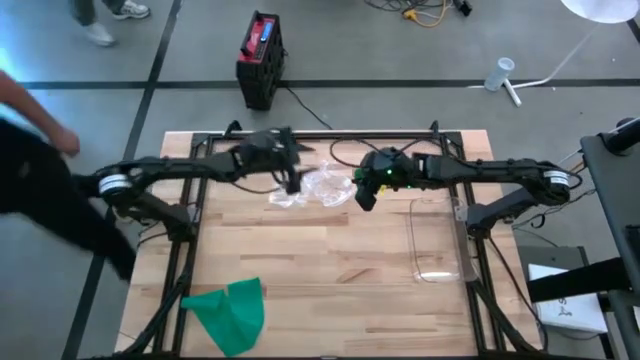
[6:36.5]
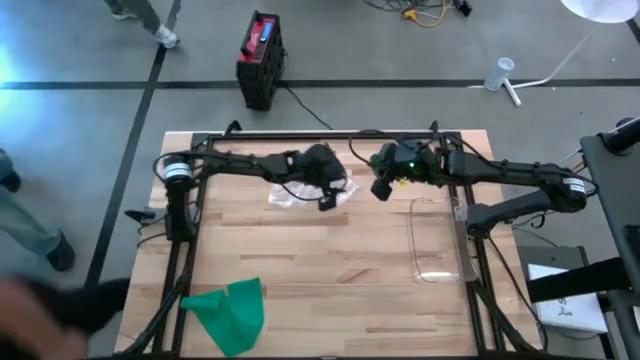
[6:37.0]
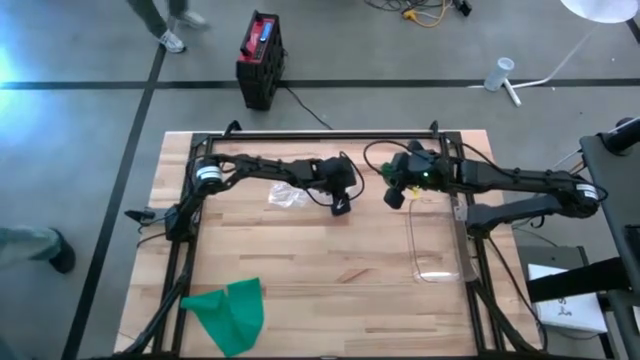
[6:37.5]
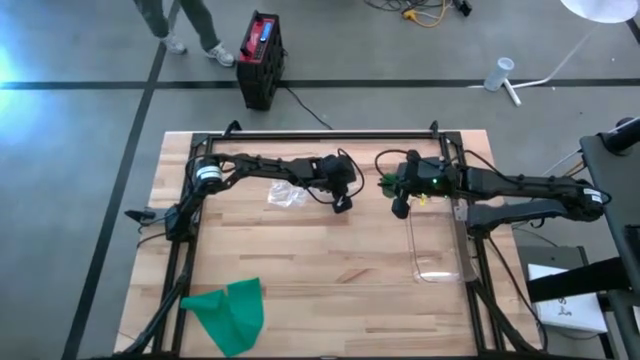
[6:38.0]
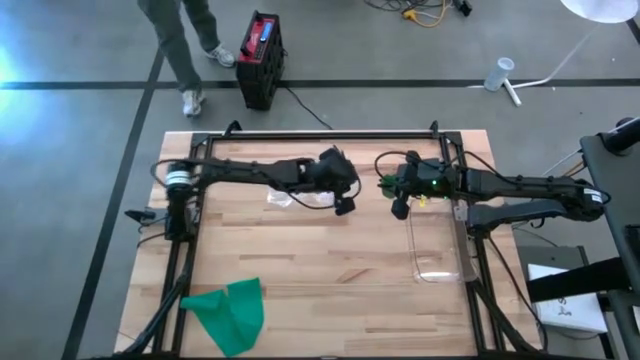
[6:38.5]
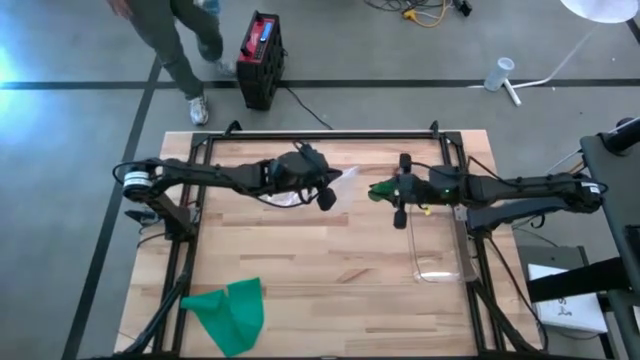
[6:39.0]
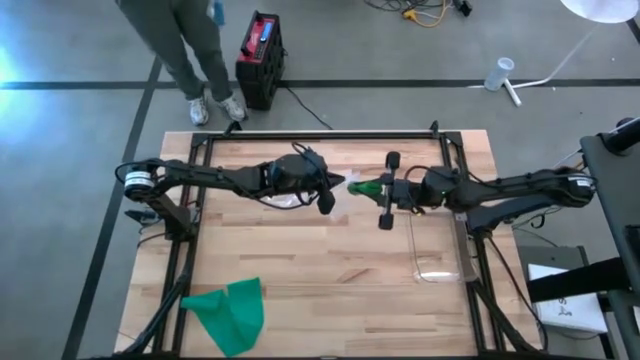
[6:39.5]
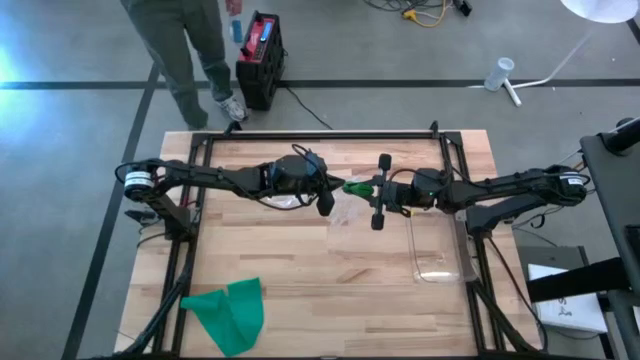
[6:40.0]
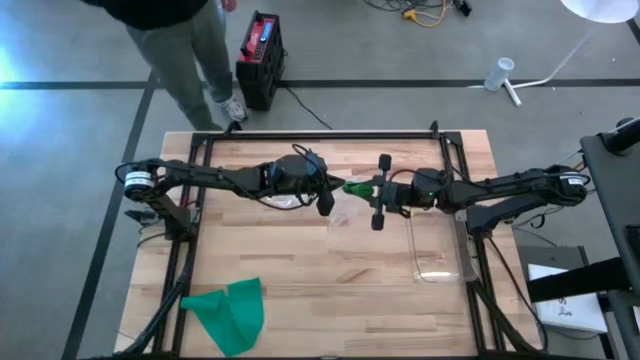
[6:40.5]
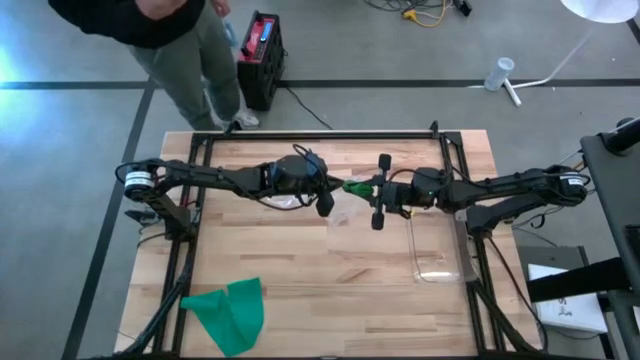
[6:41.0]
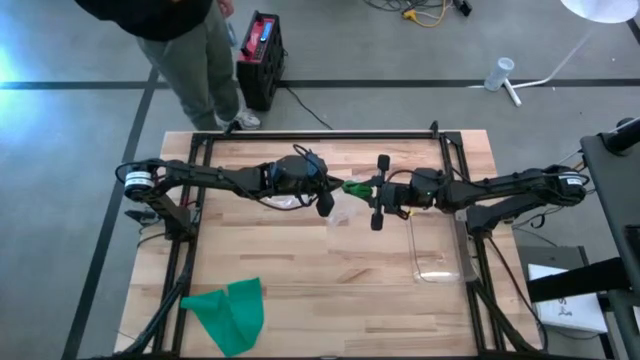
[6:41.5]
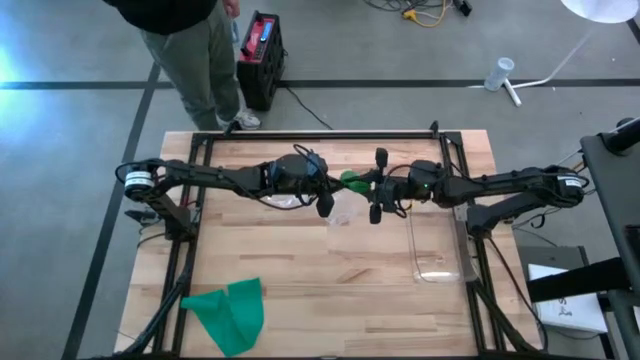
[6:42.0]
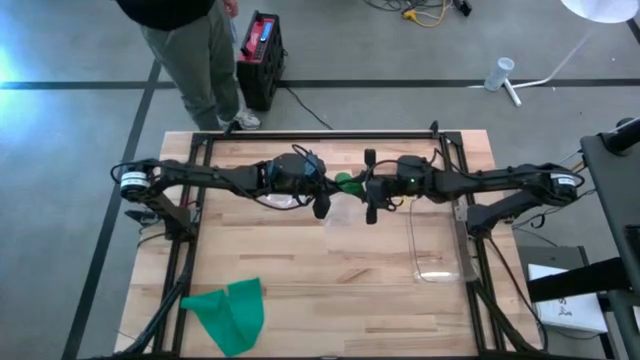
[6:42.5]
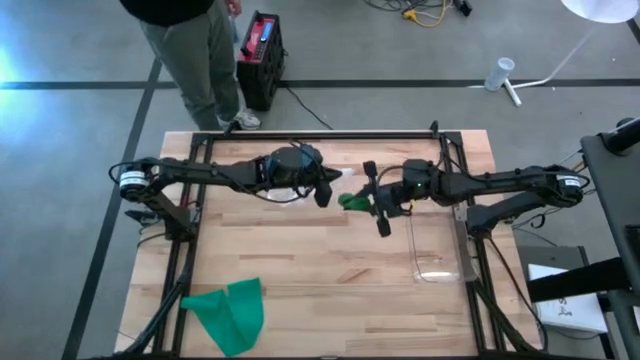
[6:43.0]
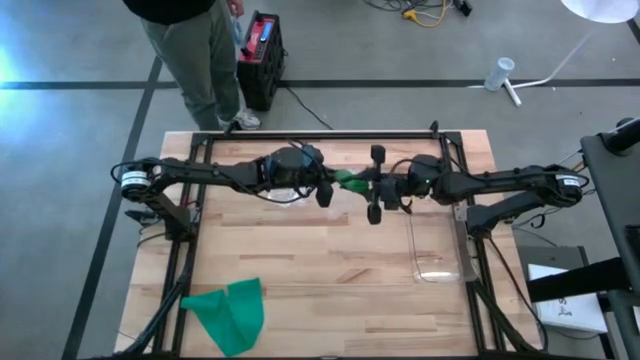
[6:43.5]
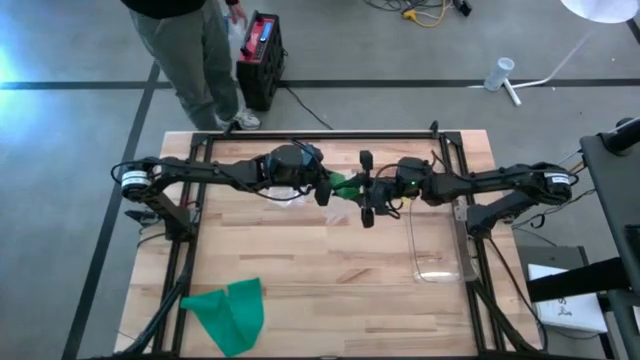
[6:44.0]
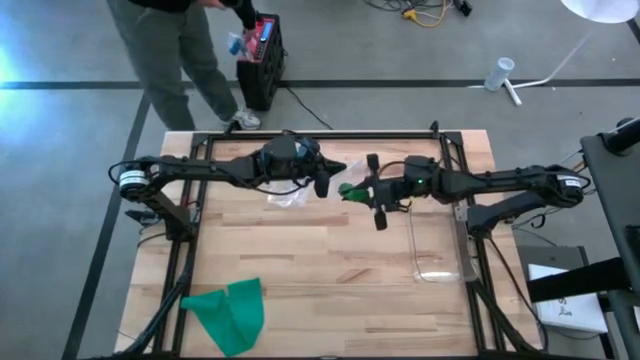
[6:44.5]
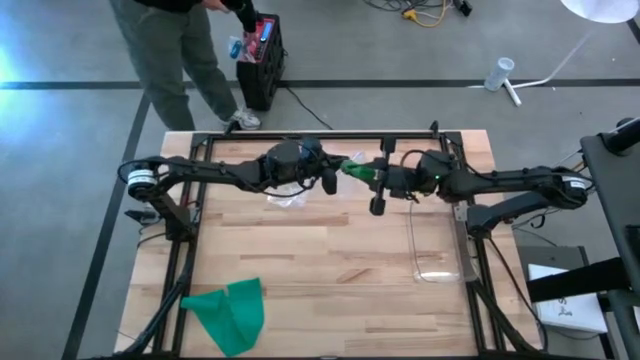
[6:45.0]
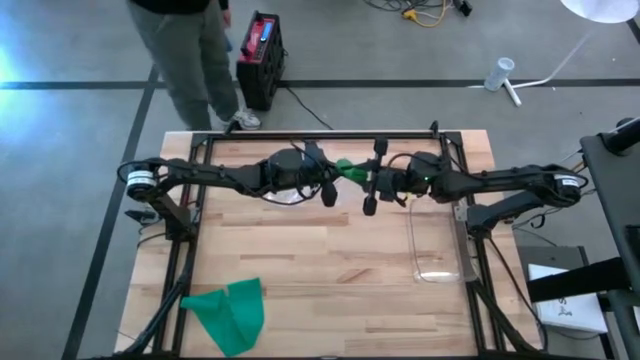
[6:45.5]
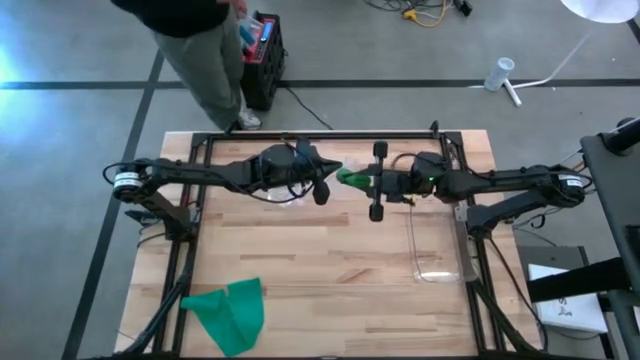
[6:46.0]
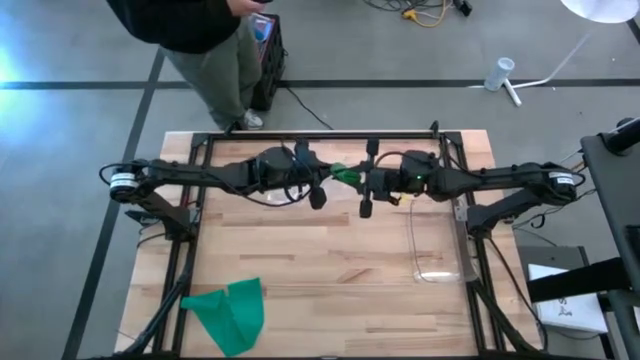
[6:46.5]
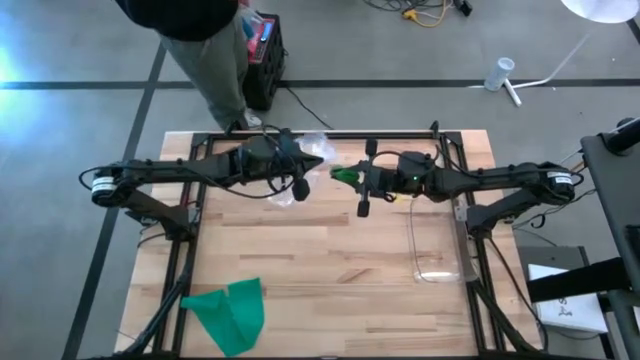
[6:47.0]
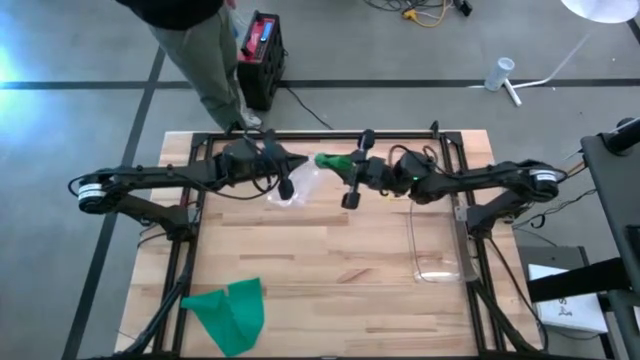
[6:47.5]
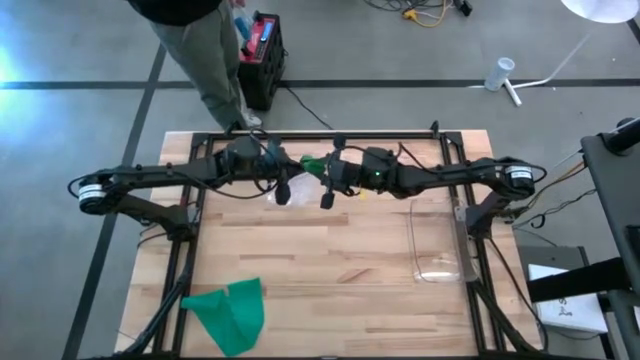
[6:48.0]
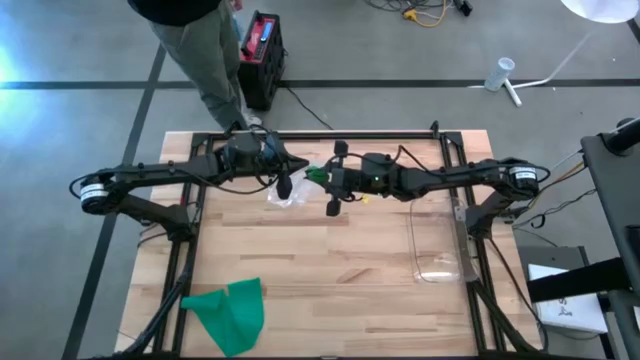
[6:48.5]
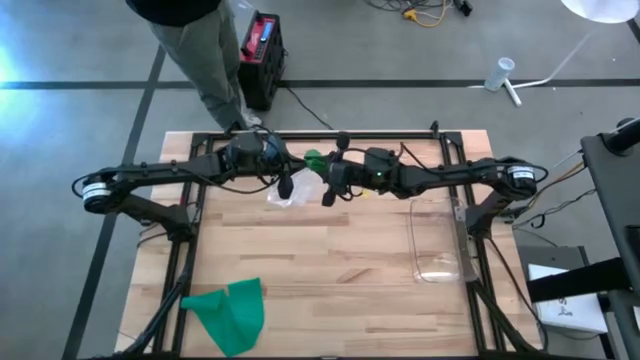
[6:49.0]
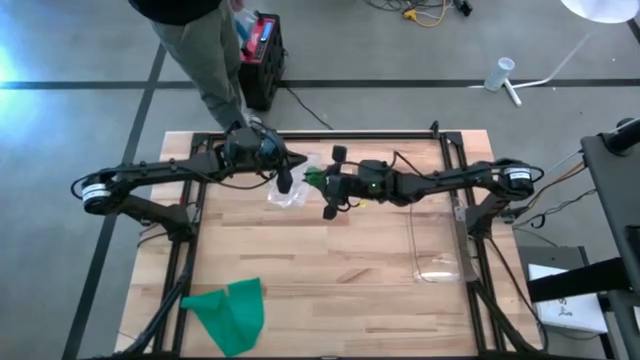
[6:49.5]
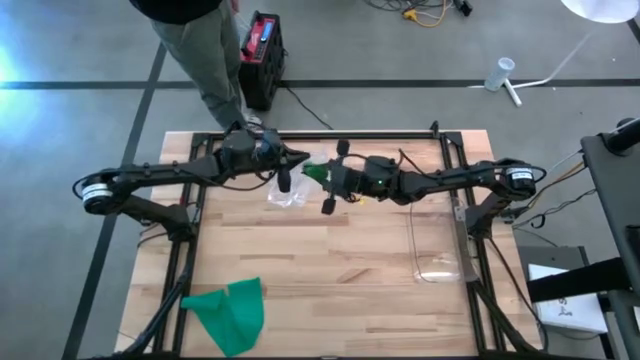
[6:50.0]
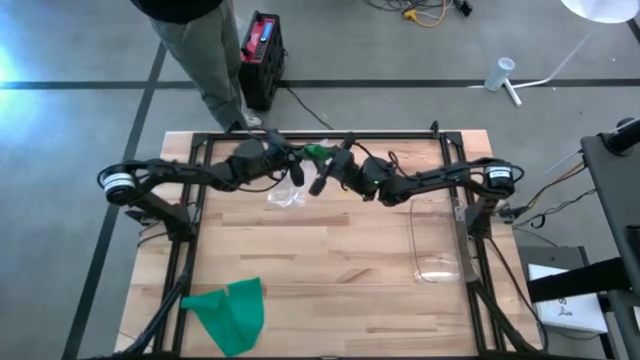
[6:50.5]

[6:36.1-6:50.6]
Task: Roll bandage
Put the rolled green bandage into the transparent zip bag

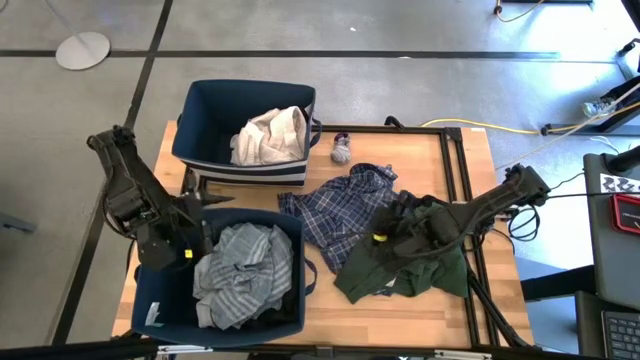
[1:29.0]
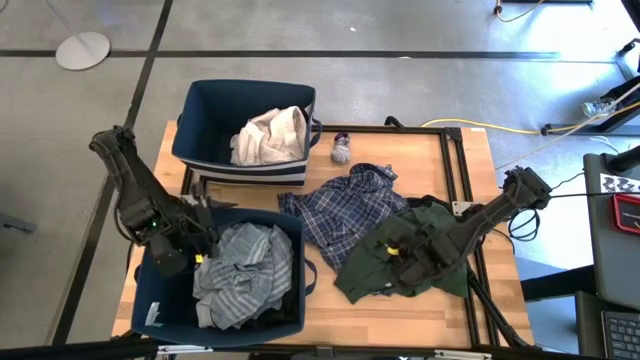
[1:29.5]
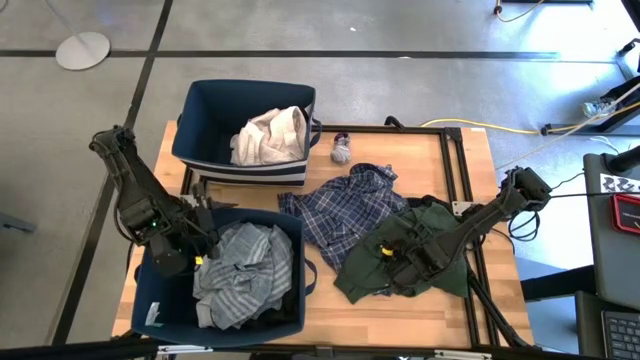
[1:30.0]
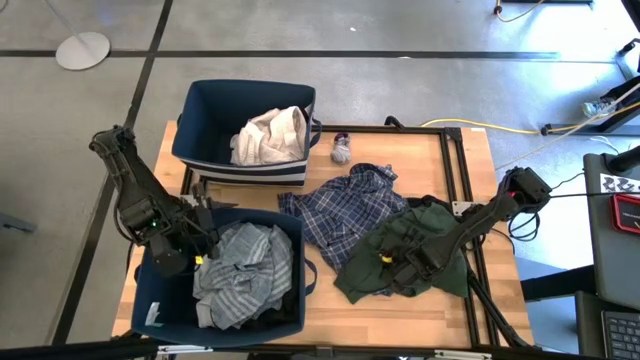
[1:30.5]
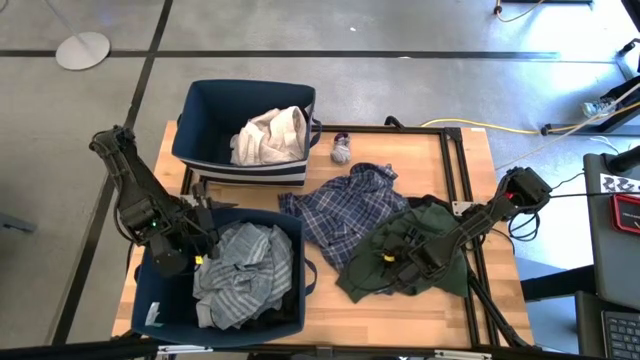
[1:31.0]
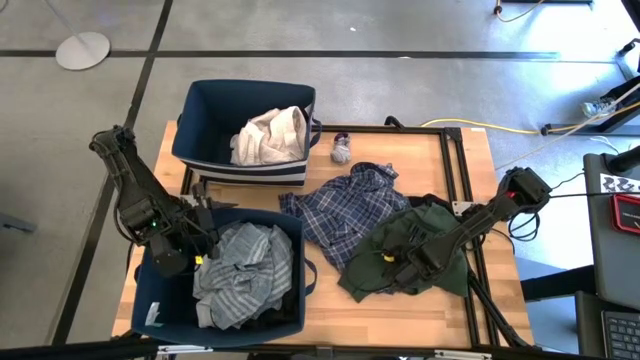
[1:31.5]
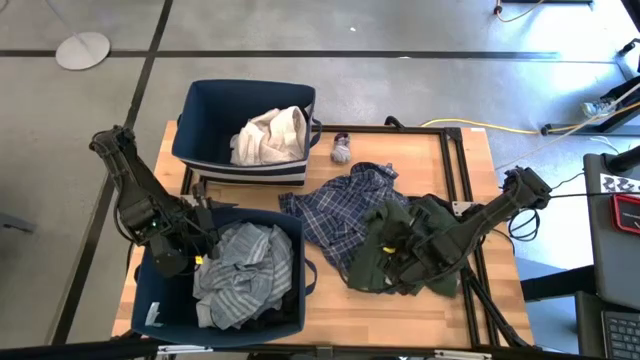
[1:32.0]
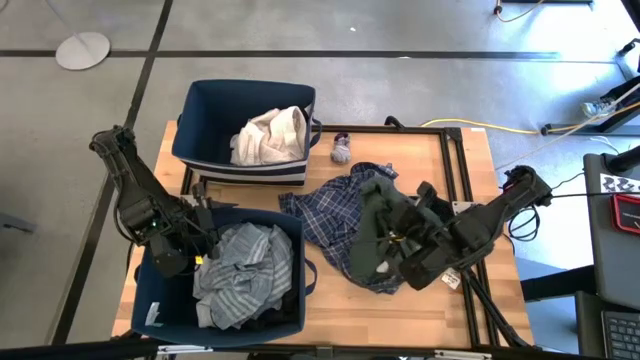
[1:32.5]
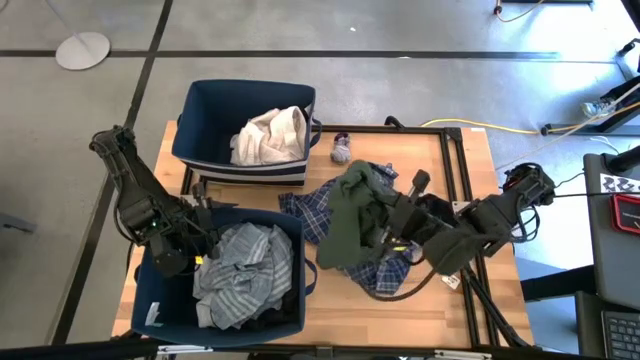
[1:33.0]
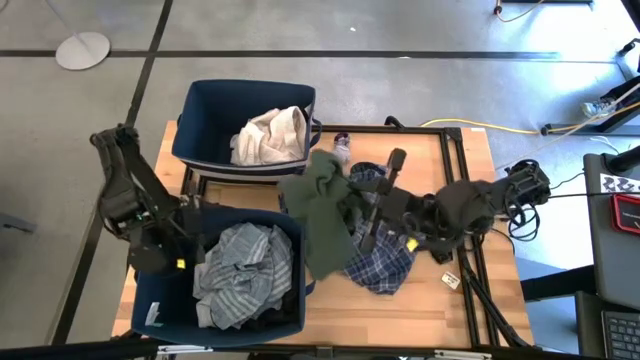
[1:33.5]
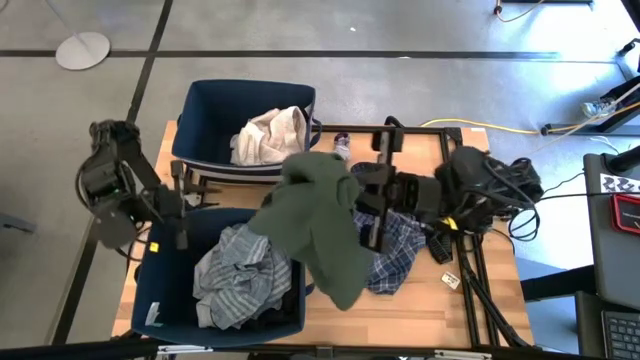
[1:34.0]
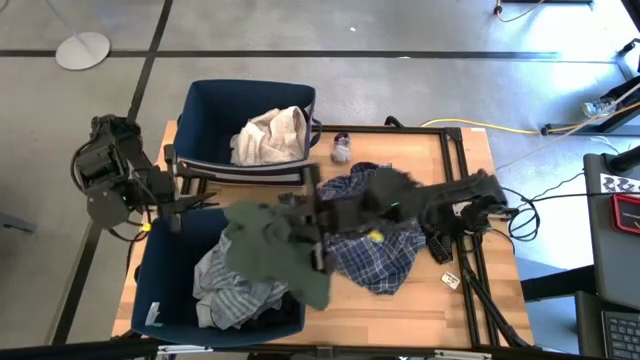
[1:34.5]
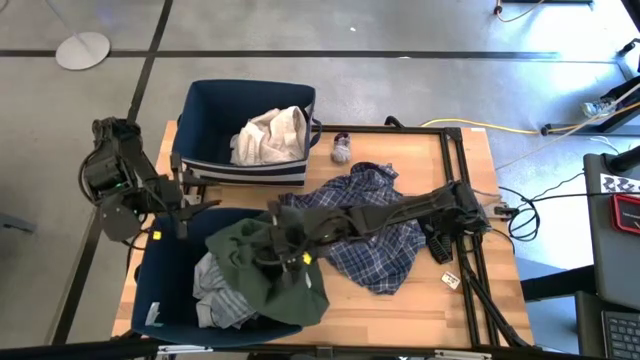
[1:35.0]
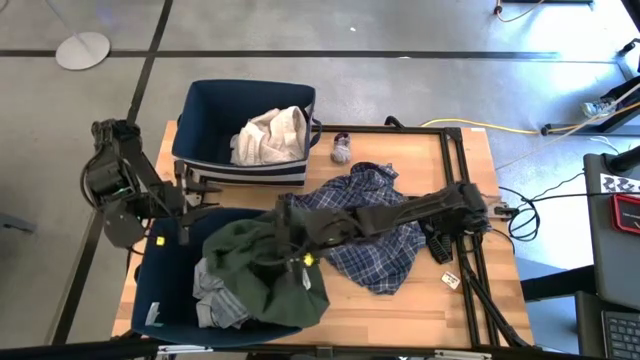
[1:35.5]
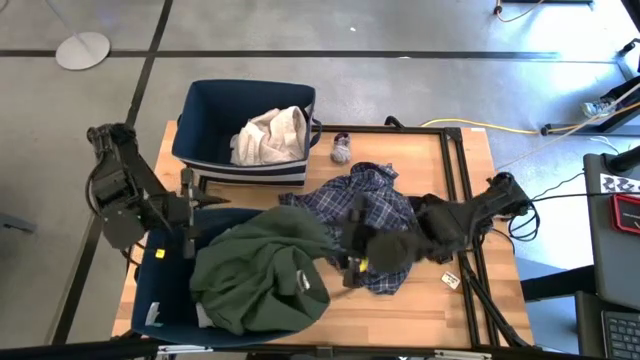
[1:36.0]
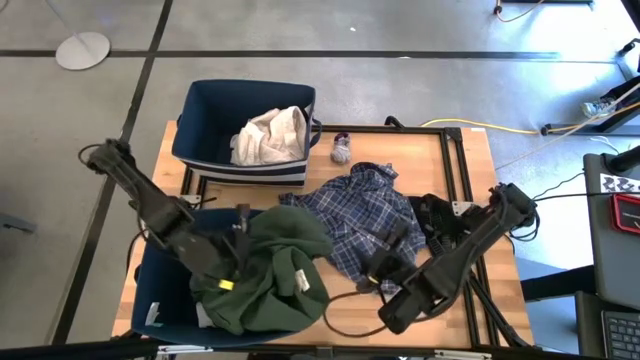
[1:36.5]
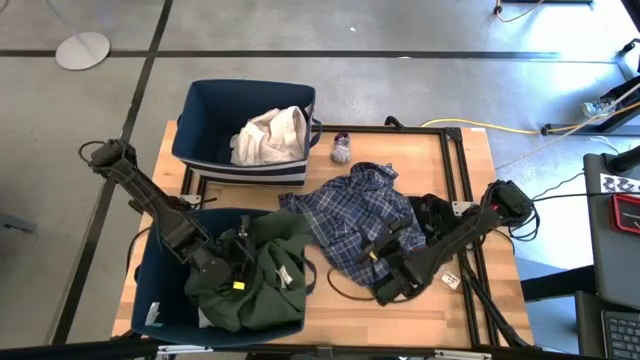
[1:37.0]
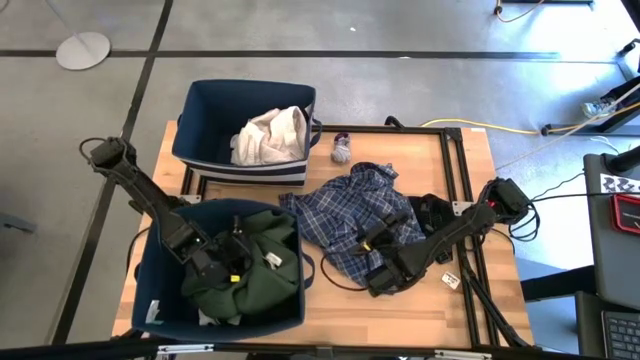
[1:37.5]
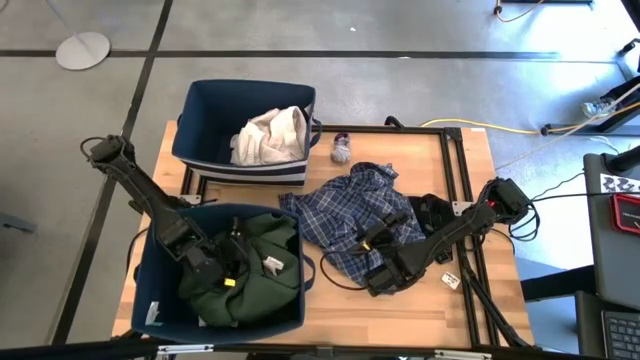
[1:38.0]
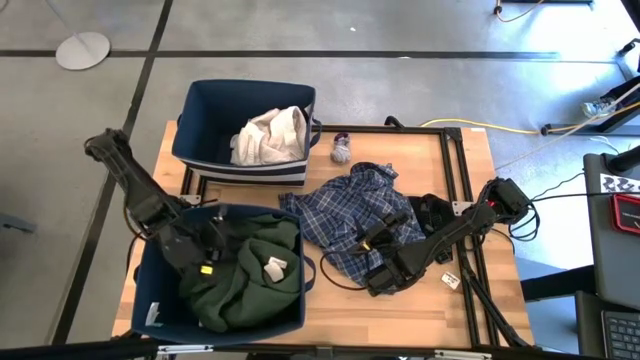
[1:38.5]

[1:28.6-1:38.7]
Task: Sort clothes
Put the green long sleeve into the bottom blue laundry organizer
